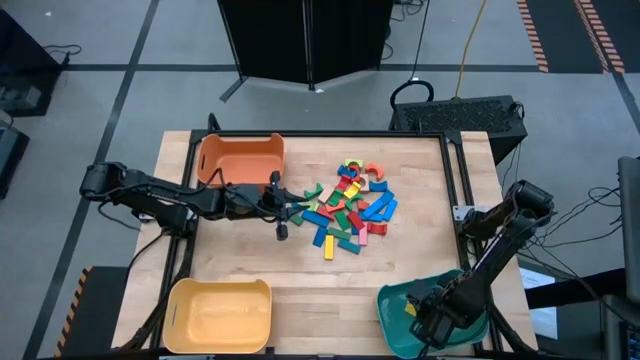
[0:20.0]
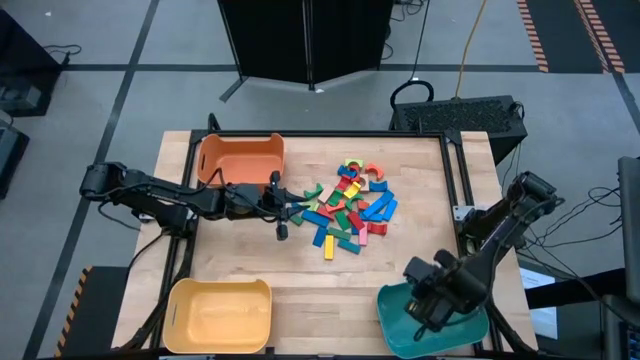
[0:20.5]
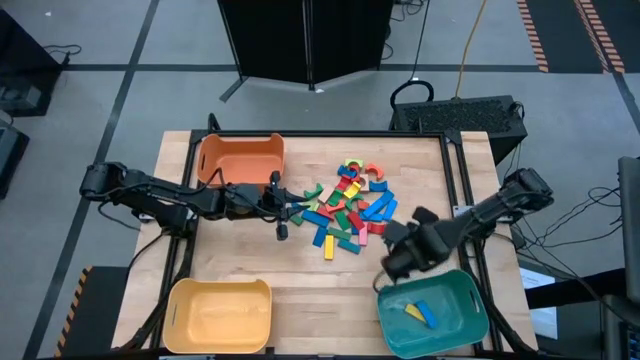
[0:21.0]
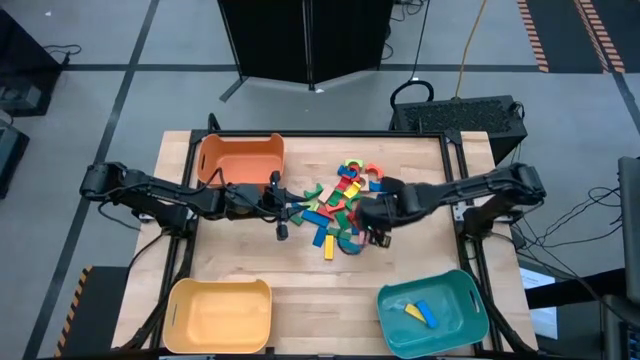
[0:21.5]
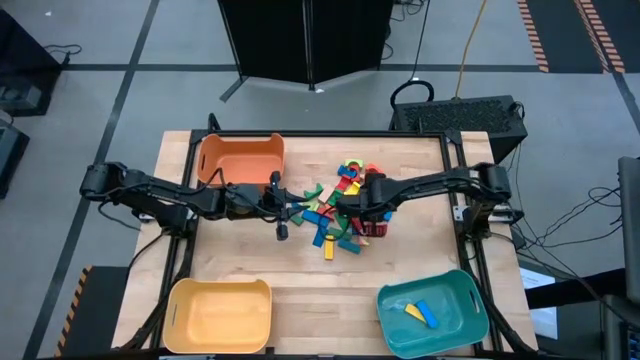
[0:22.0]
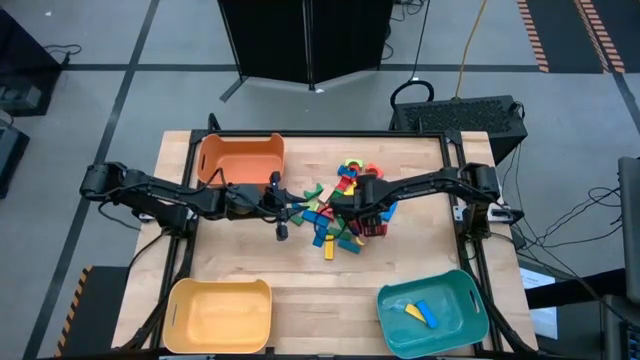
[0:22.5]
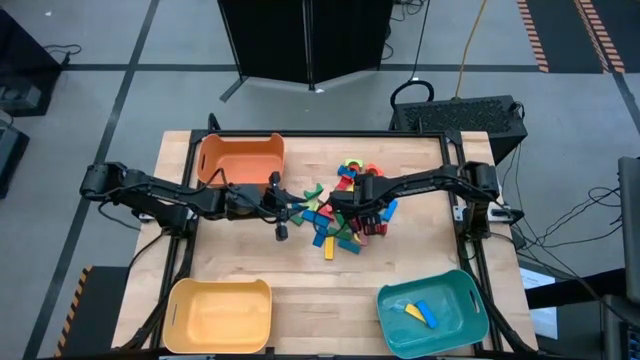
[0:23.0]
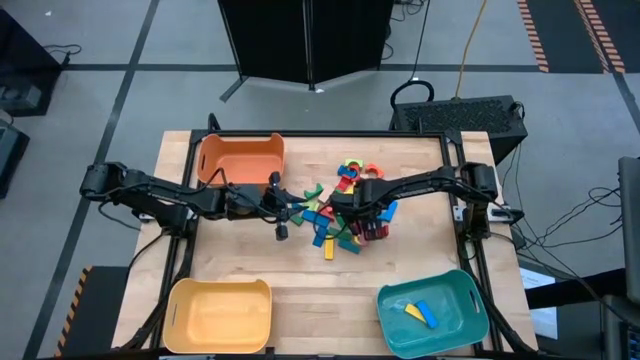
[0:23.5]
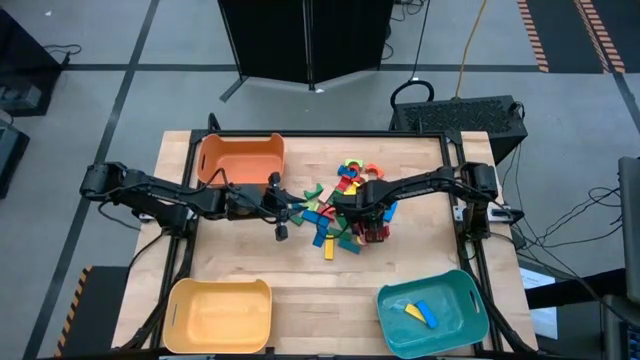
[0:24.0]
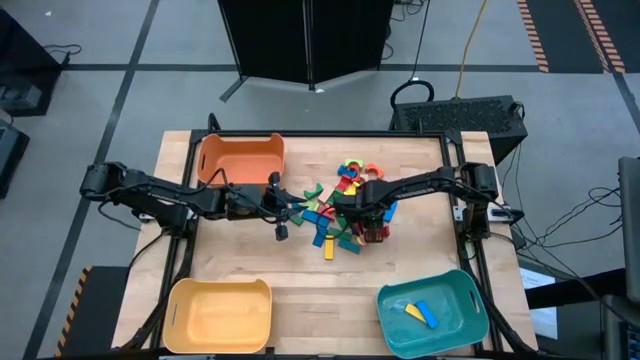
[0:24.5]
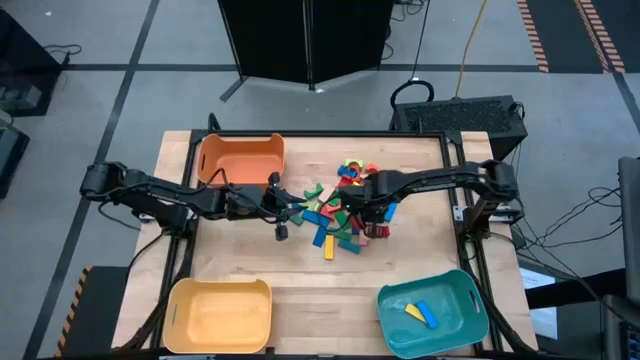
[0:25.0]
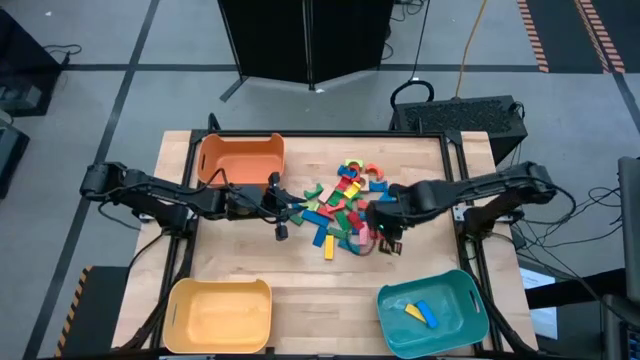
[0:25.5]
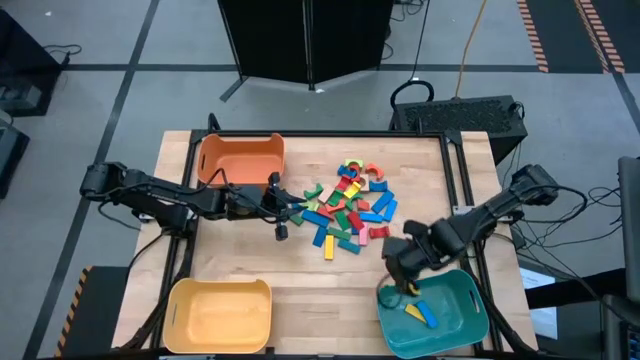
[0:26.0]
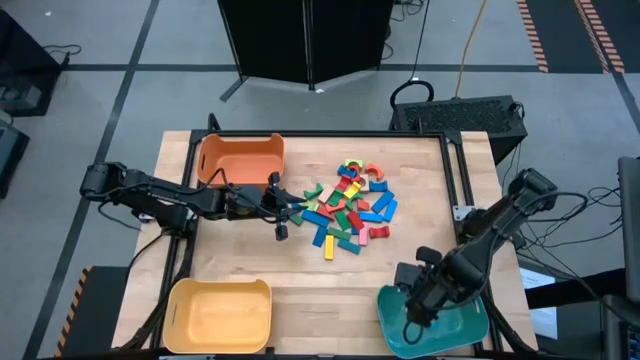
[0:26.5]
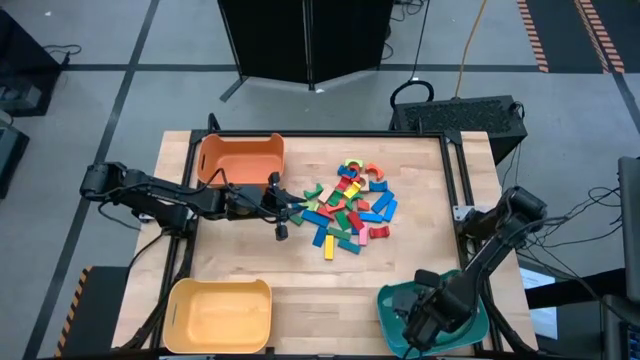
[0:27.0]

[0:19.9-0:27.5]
Task: Sort blocks by size
Put the blue rectangular block into the blue bin

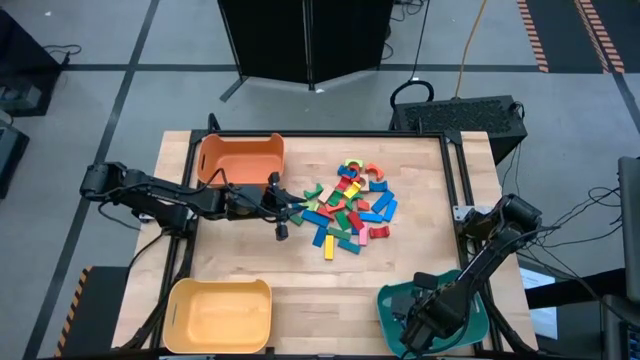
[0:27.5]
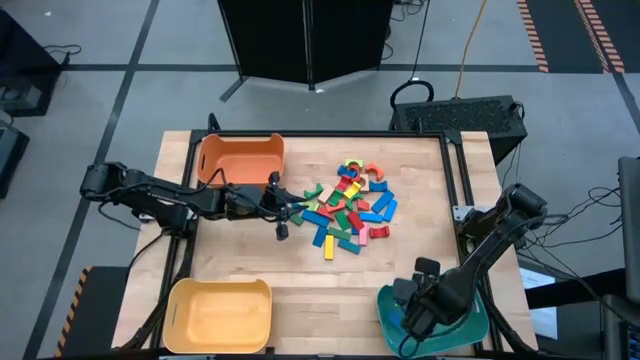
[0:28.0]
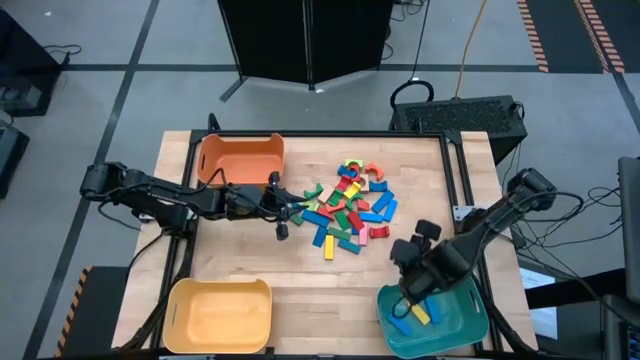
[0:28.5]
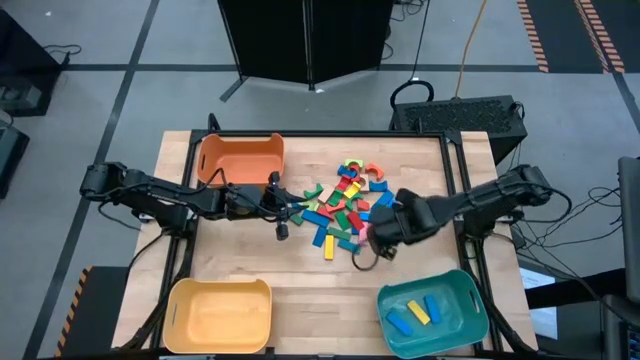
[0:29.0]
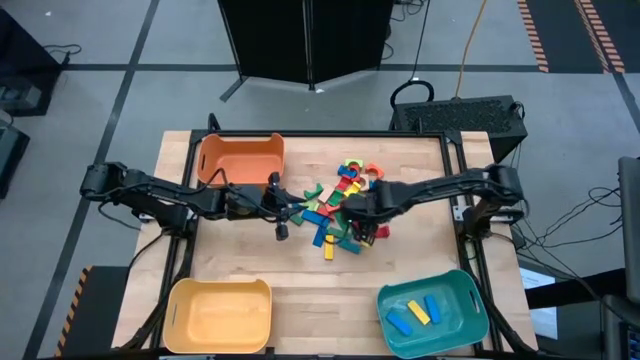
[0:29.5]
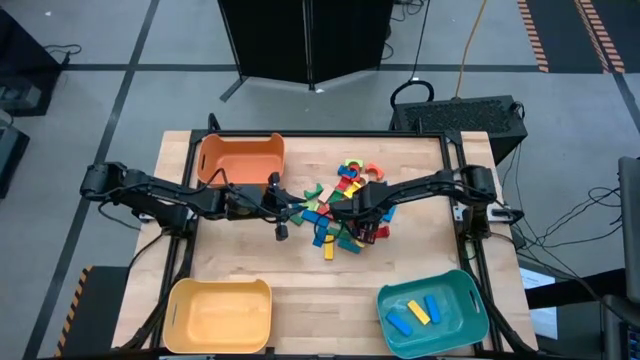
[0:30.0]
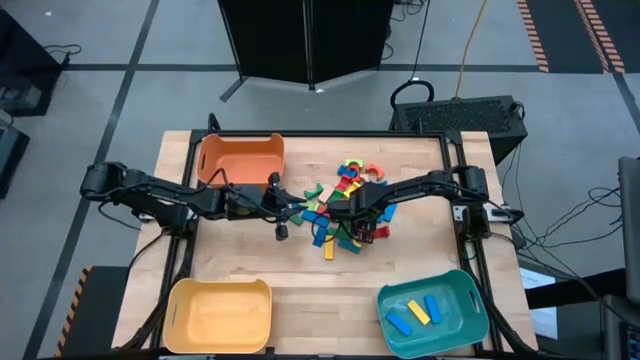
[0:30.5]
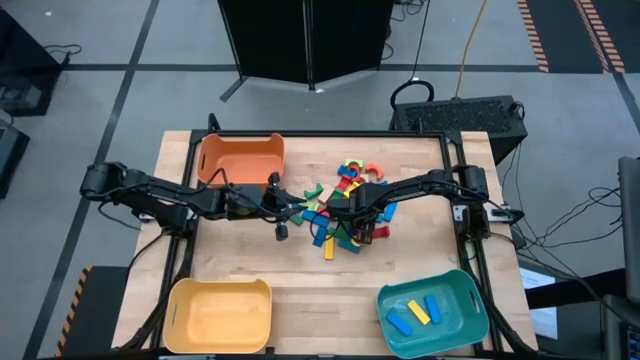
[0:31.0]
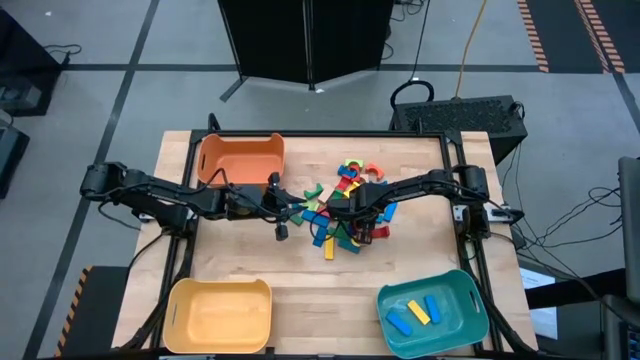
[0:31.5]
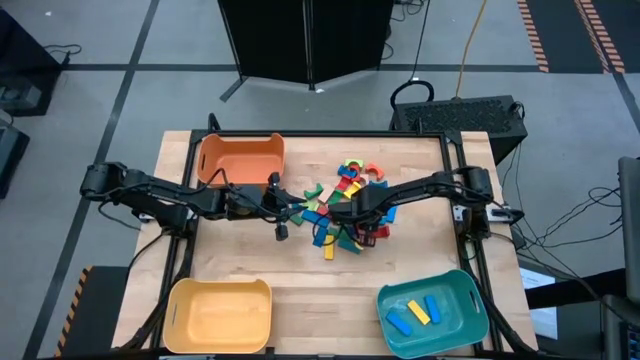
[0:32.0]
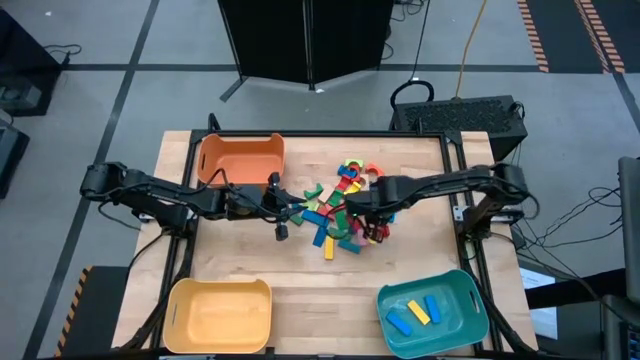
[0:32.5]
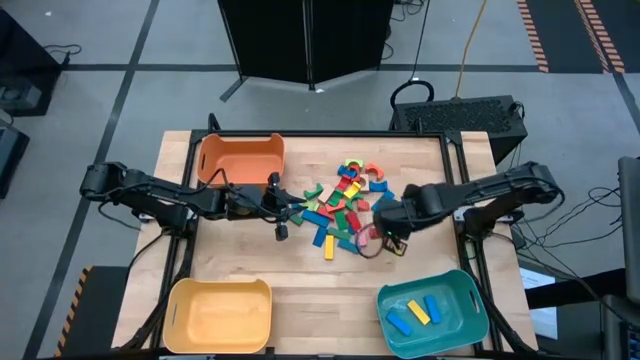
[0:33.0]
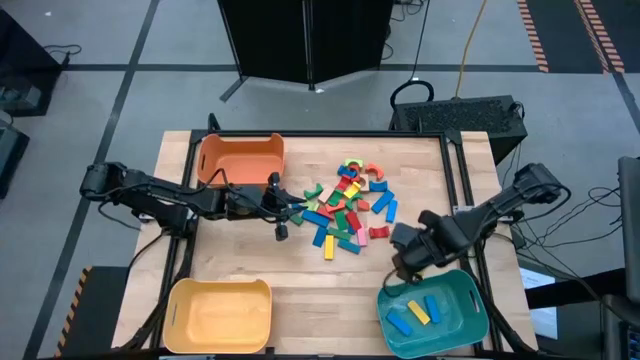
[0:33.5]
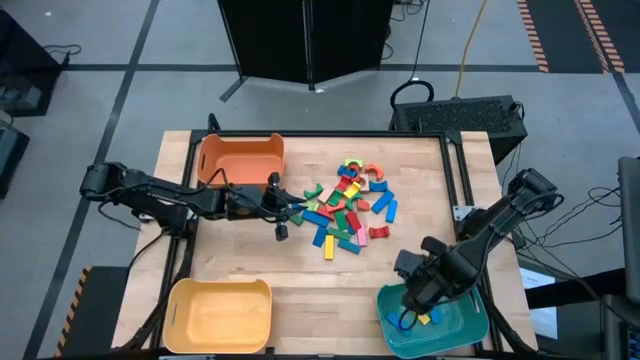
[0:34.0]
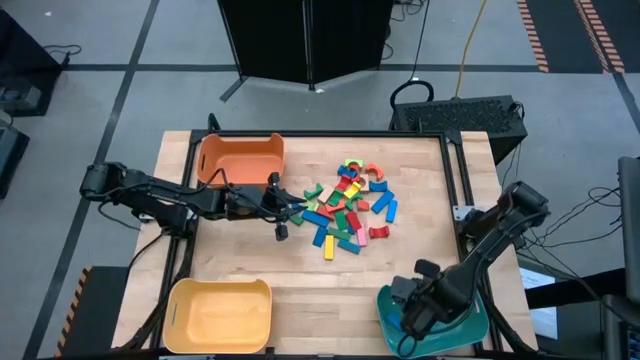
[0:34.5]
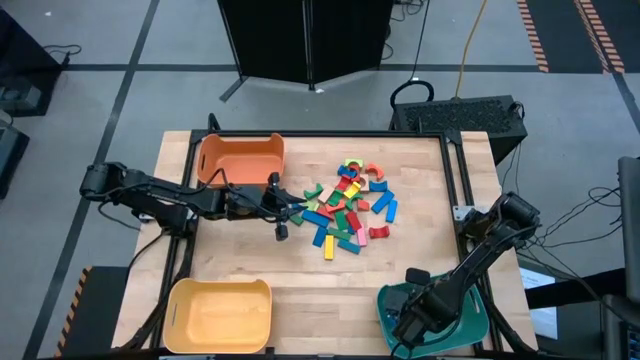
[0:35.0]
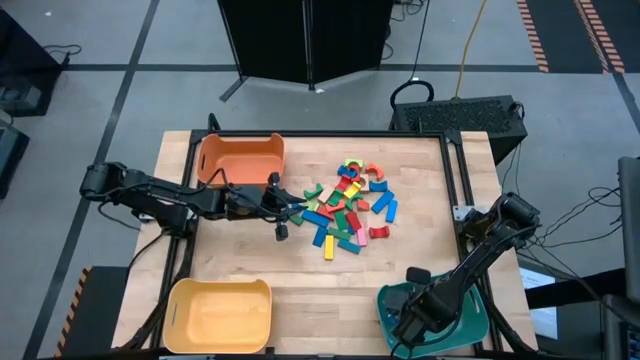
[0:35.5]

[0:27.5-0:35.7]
Put the blue rectangular block into the blue bin

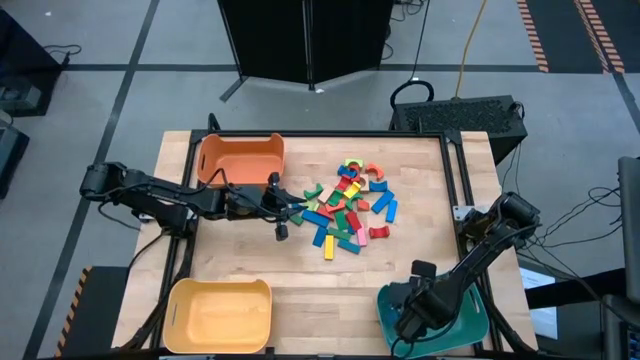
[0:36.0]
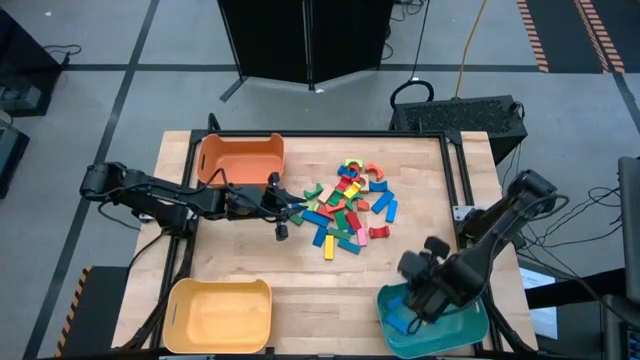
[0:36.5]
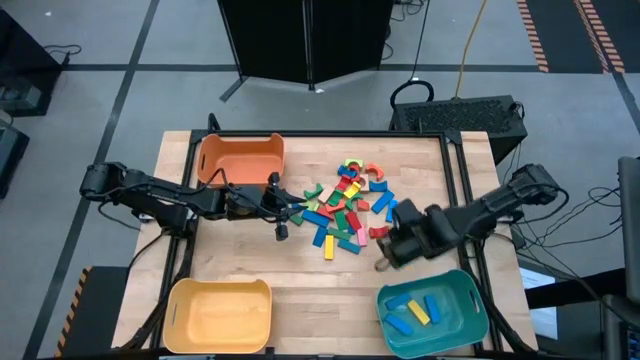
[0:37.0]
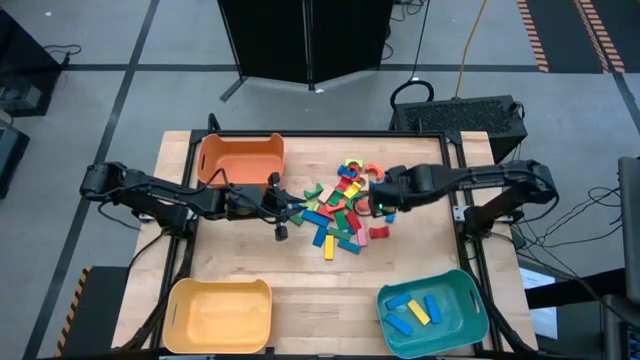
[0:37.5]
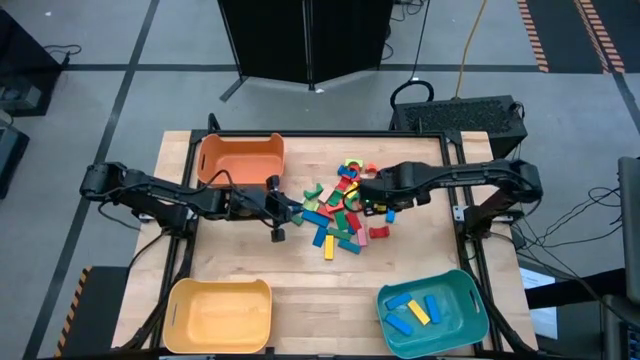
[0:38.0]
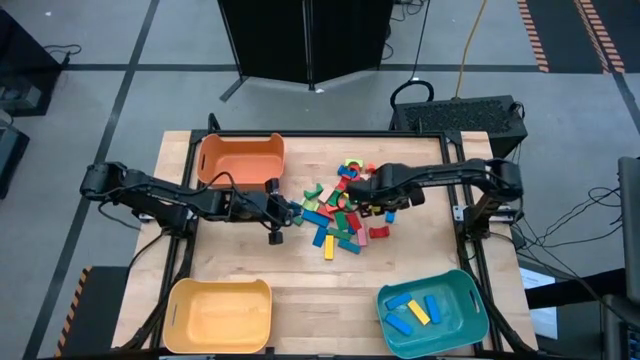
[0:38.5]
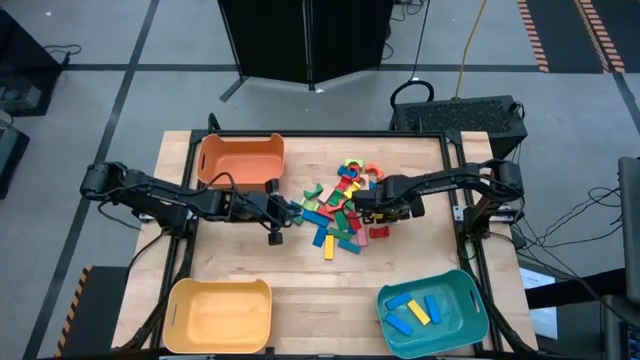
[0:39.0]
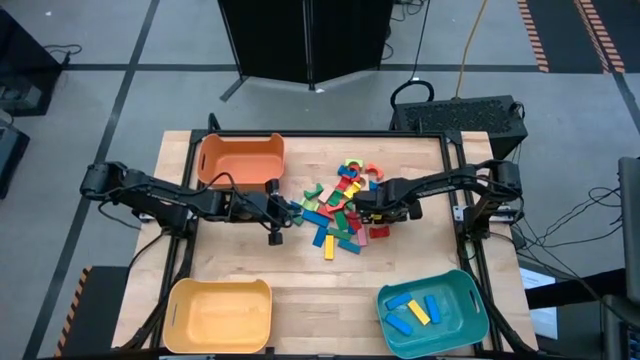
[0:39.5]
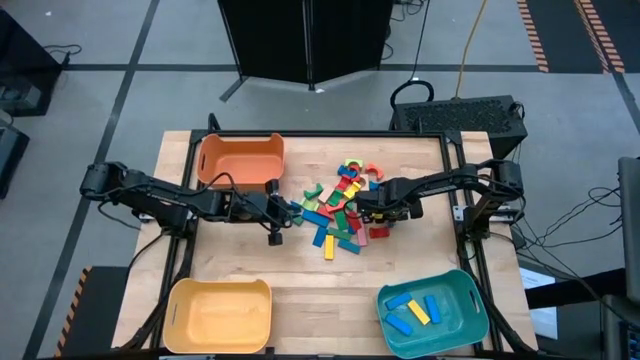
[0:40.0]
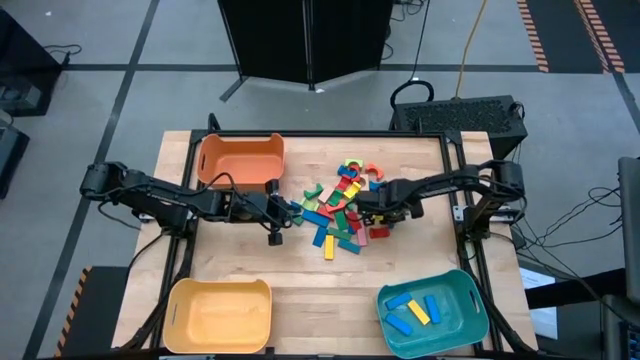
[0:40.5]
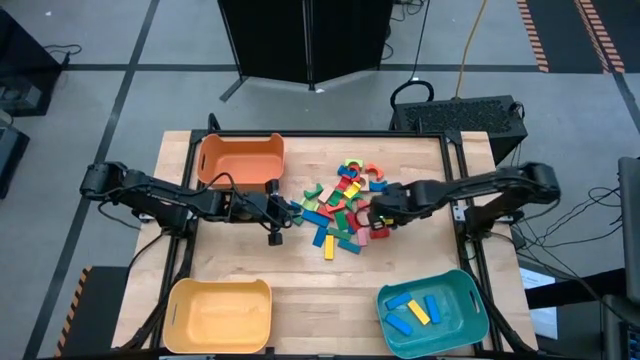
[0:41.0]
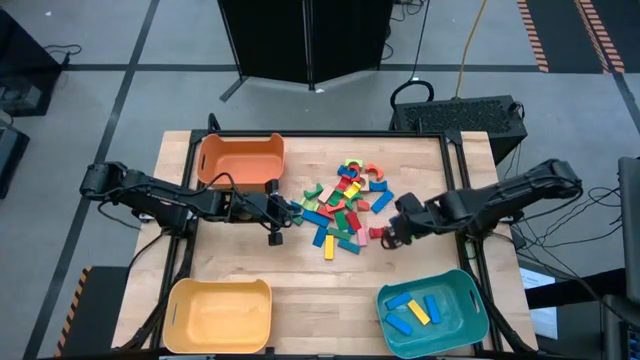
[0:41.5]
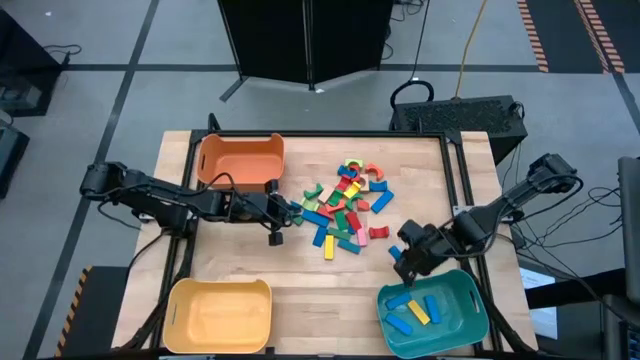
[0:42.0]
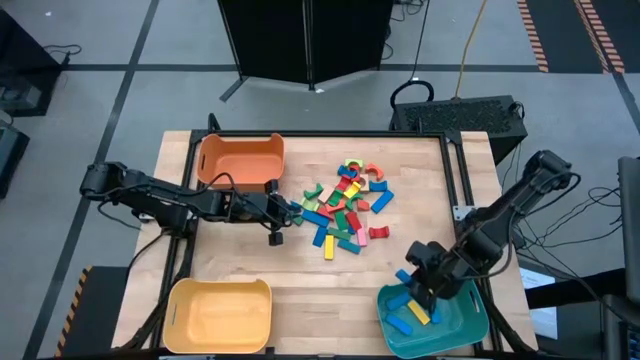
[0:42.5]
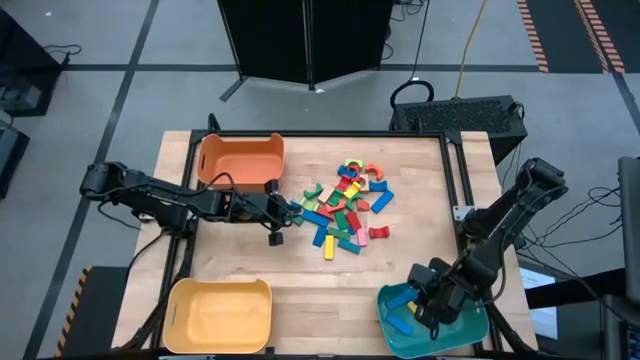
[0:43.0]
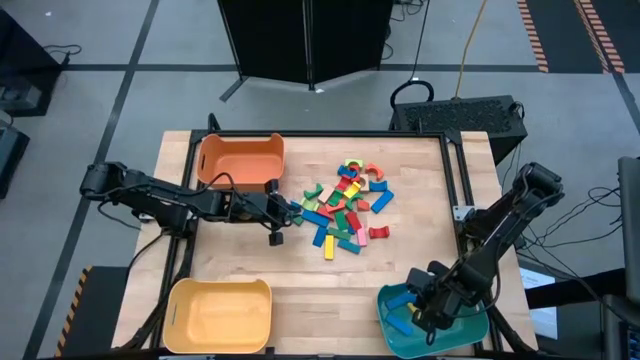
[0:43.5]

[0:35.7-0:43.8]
Put the blue rectangular block into the blue bin
